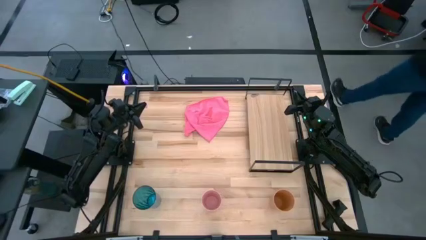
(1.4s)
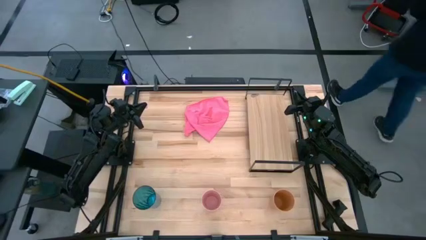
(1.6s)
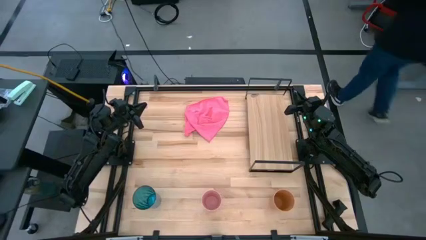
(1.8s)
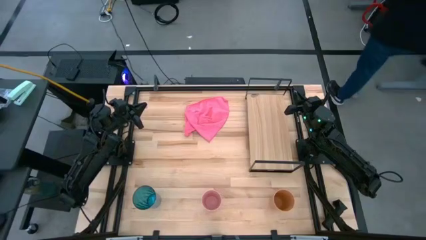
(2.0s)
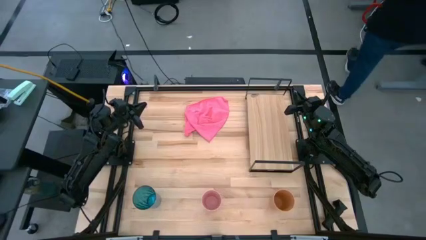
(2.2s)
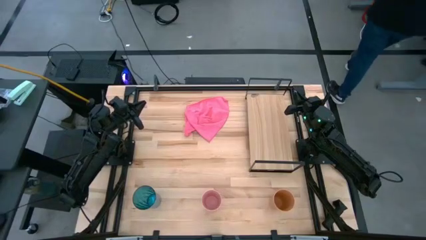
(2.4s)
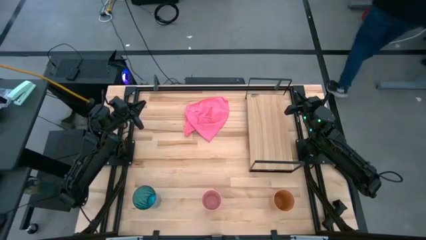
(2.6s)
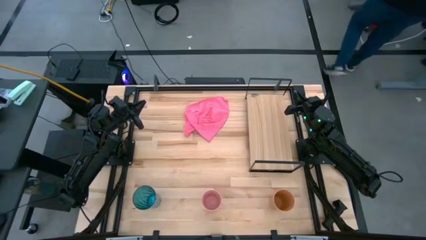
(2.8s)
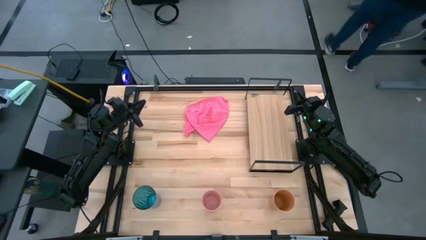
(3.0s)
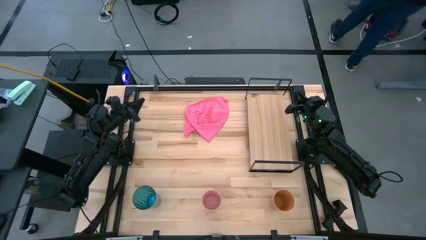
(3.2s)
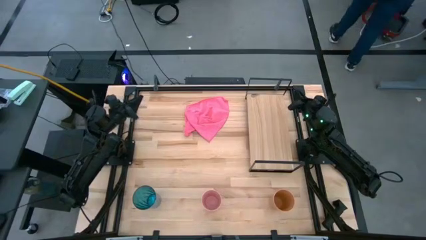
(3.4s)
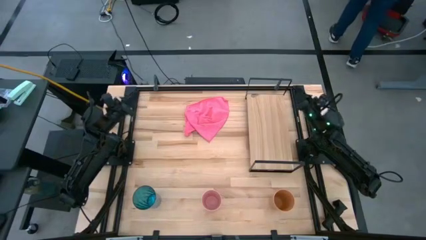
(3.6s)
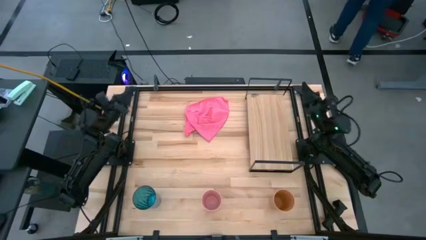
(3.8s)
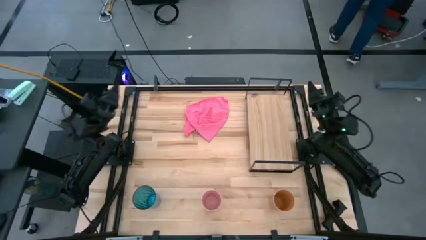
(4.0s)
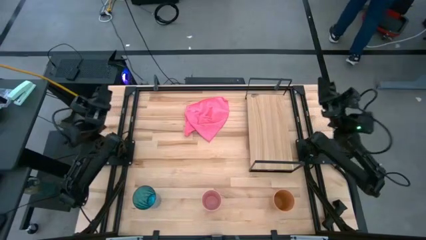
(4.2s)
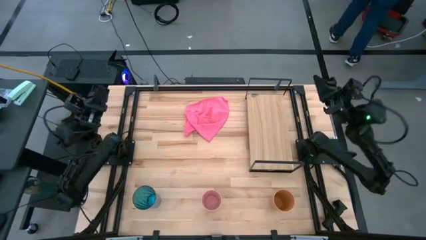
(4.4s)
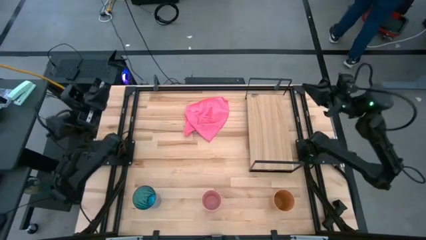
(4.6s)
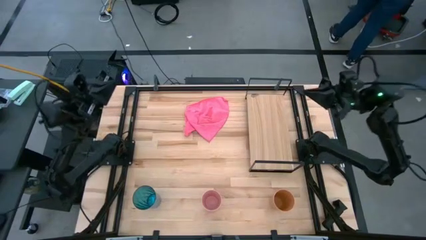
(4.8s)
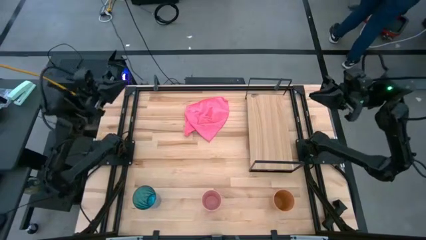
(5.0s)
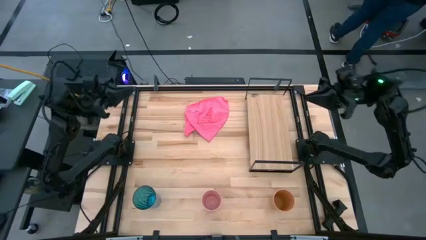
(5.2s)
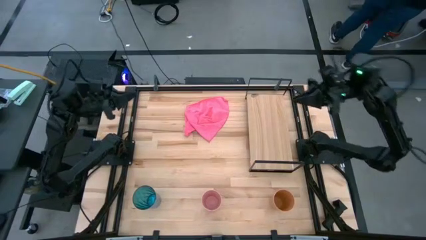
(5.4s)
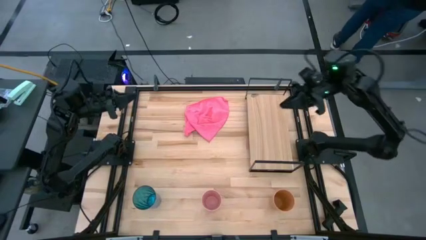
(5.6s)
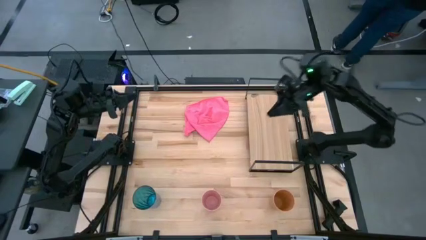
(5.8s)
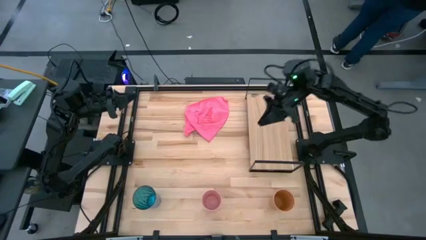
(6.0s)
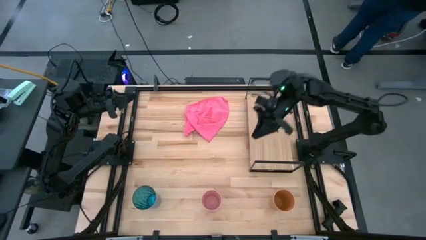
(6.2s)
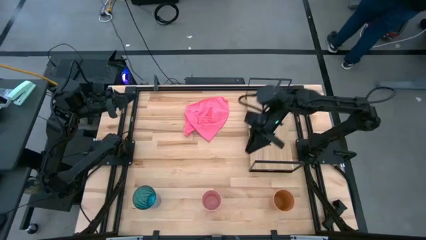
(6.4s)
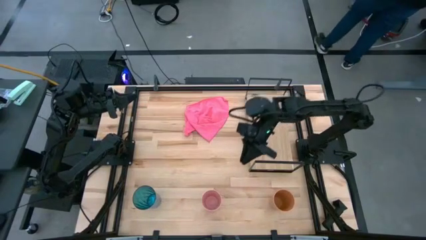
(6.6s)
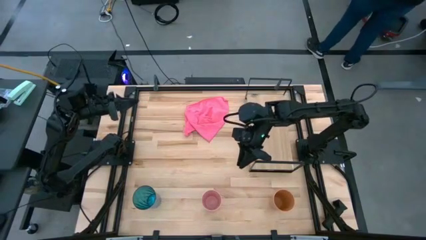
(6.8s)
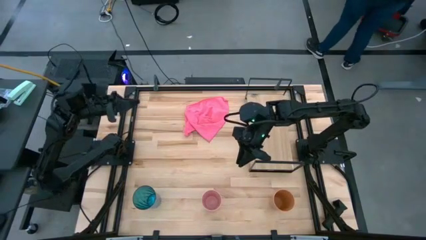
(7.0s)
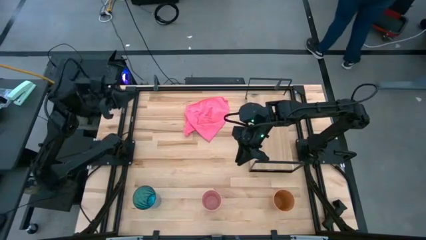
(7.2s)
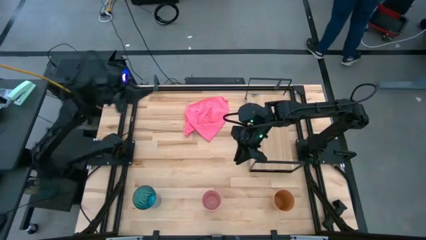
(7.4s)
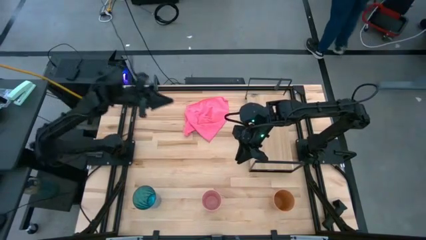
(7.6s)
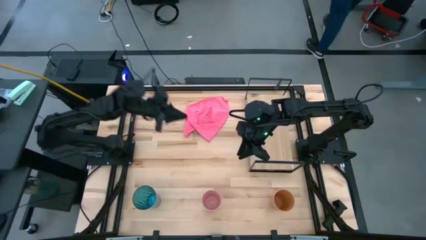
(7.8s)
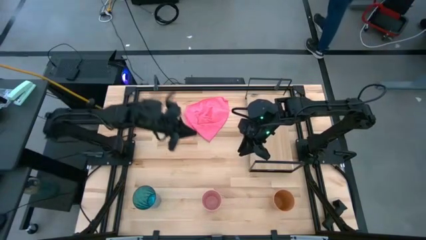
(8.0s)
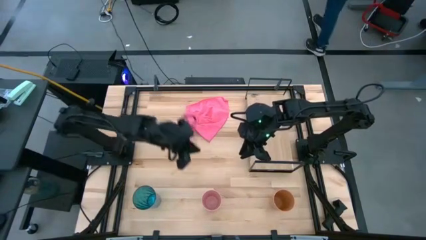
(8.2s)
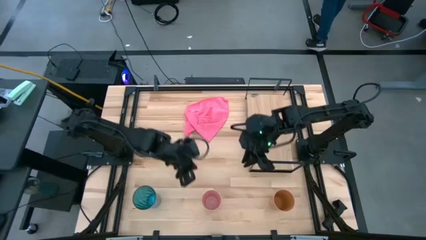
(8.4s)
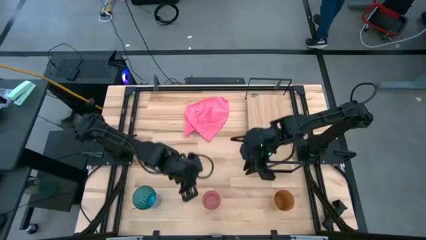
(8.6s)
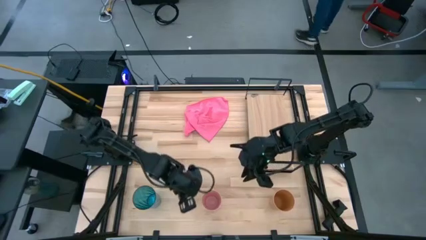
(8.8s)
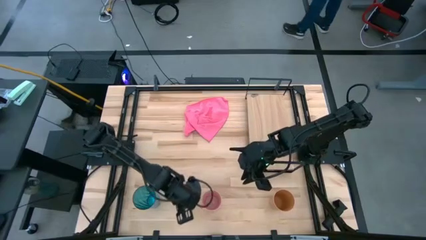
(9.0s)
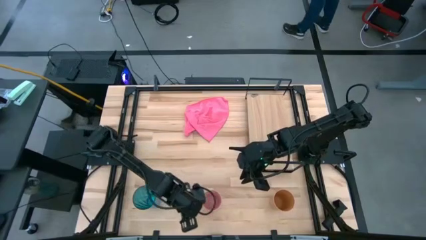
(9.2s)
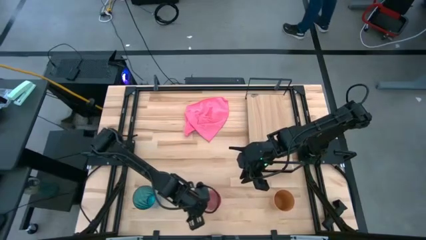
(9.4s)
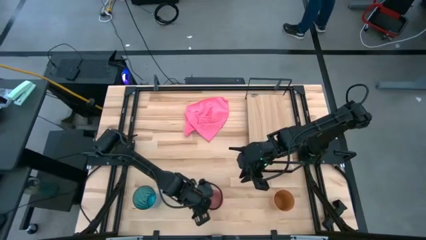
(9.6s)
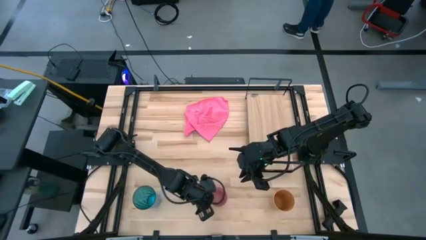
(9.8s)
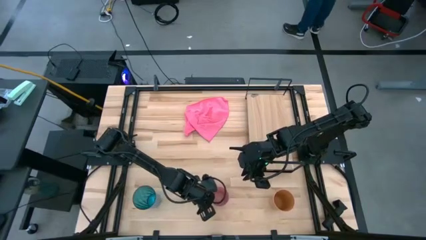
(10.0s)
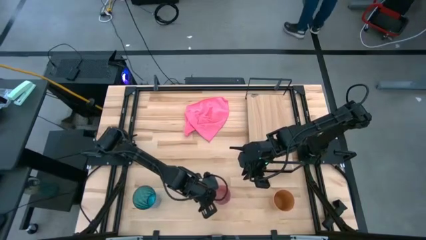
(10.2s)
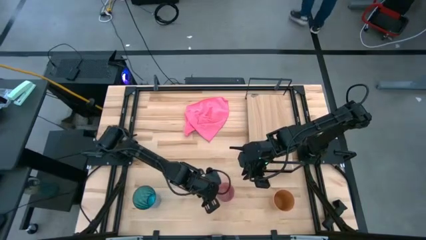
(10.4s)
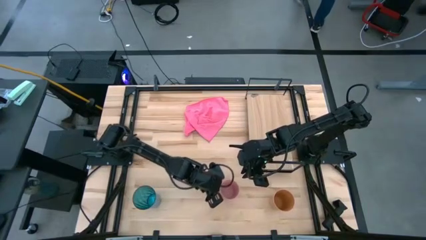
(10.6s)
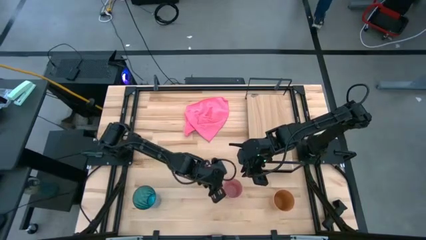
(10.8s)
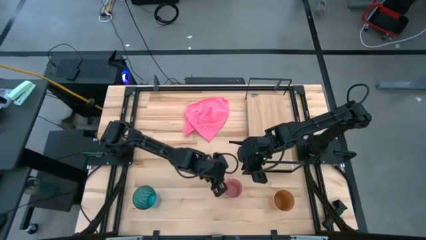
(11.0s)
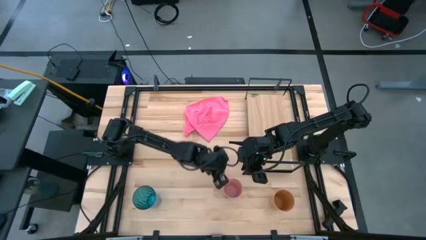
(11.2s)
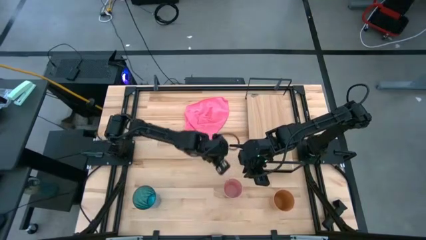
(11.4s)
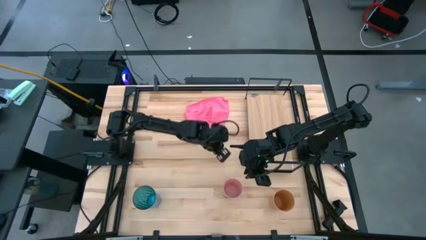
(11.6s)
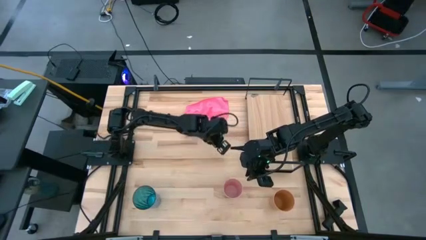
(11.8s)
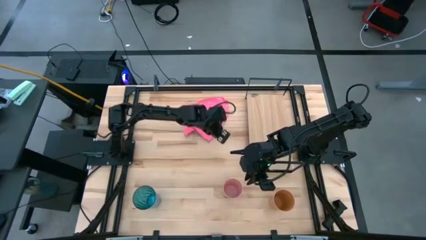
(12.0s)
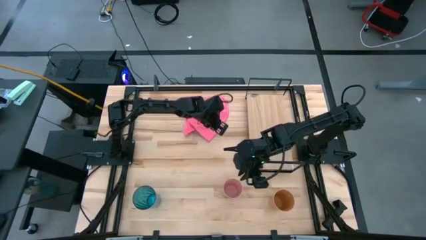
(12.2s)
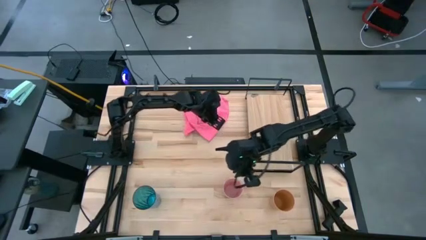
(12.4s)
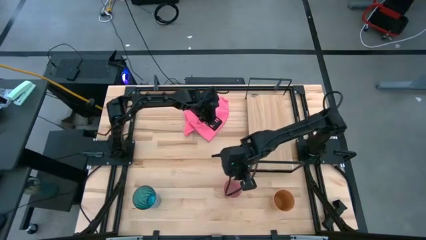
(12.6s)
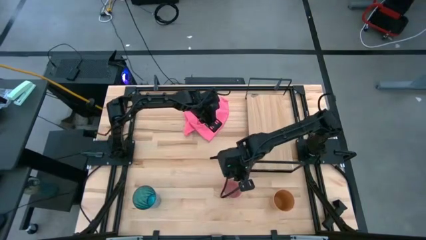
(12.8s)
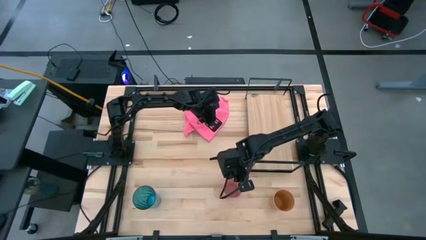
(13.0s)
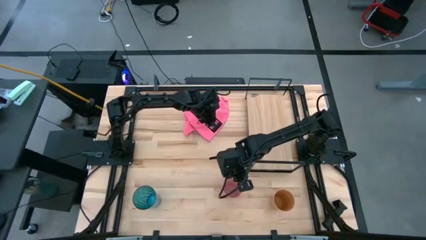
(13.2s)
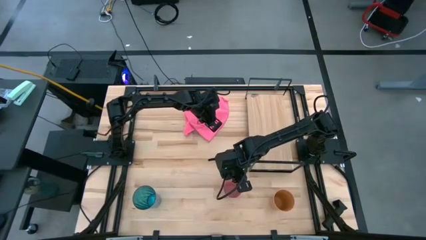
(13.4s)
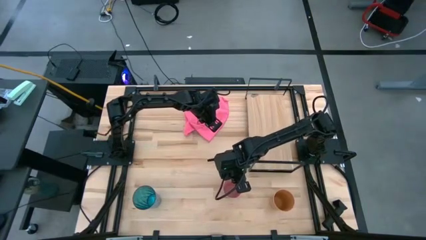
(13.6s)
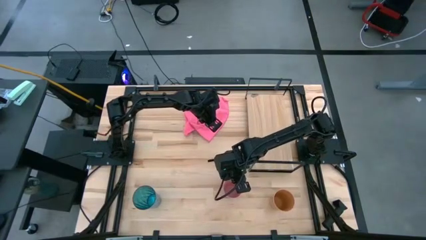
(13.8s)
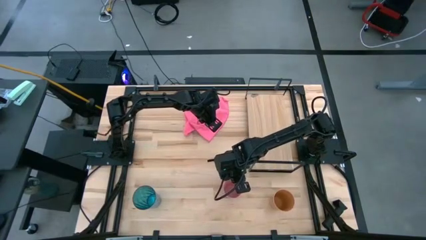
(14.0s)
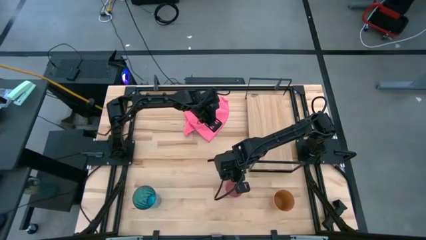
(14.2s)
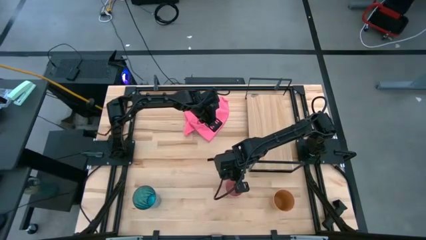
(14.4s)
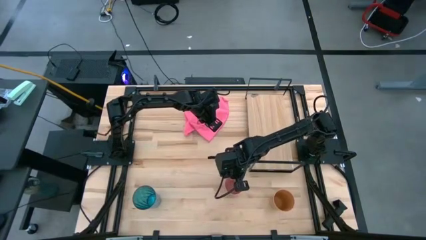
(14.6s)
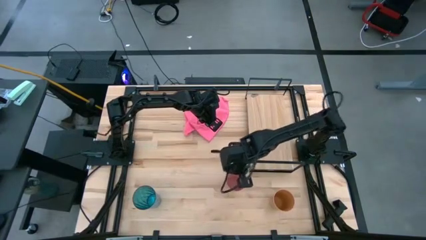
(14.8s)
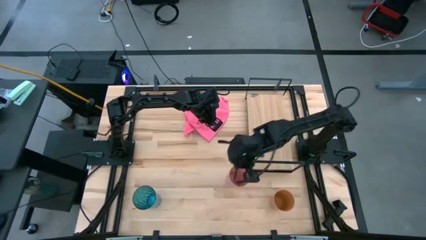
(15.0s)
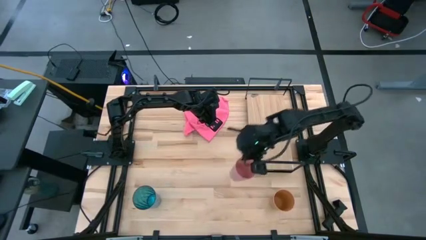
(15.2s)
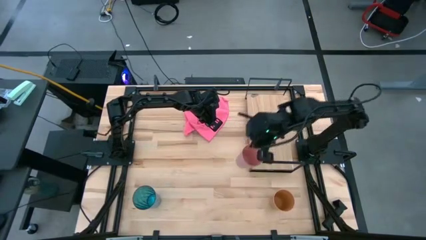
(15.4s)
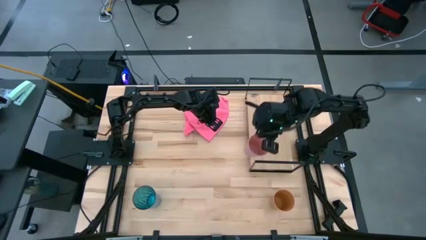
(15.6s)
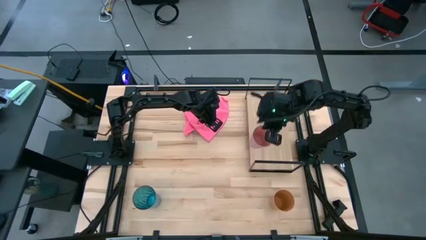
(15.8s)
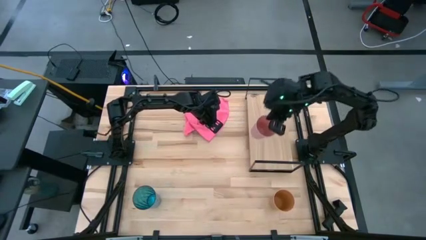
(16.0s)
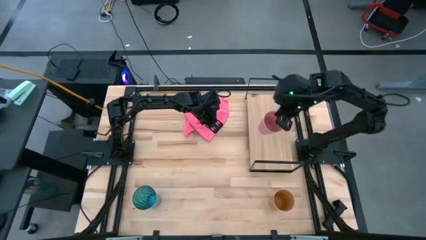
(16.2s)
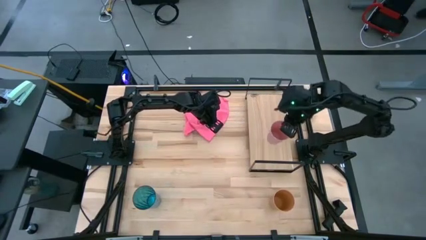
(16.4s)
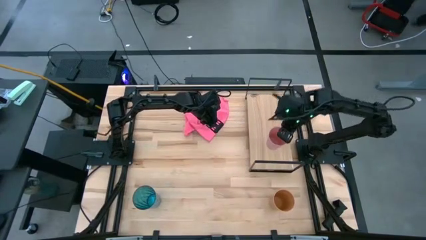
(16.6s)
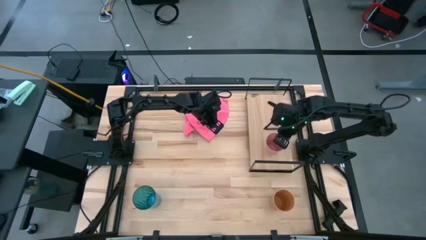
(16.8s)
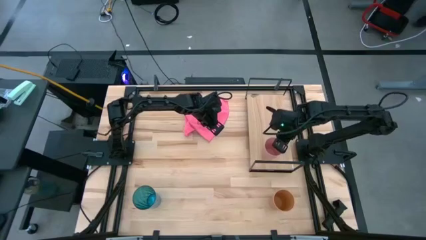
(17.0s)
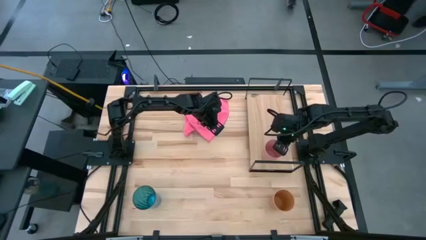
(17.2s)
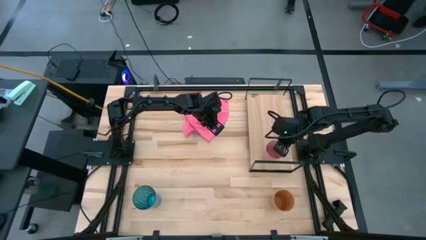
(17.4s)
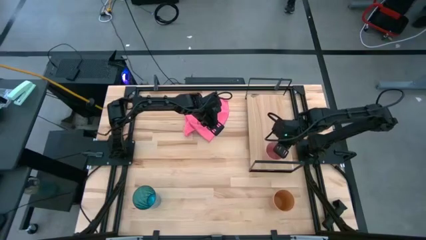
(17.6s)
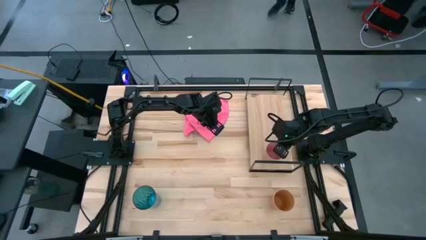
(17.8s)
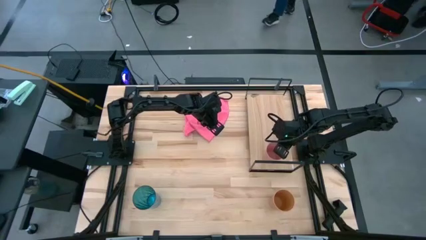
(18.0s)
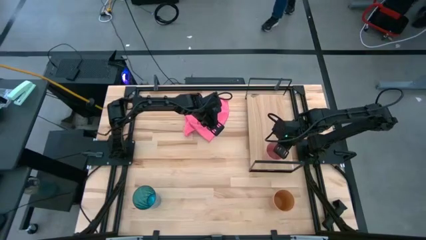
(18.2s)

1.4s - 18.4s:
Task: Stack small to large cups/mugs on shelf
Put the pink cup on the shelf
